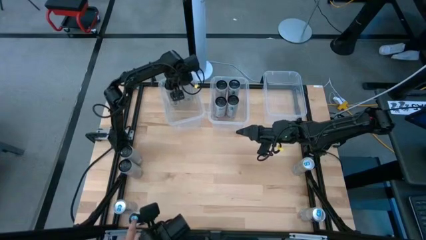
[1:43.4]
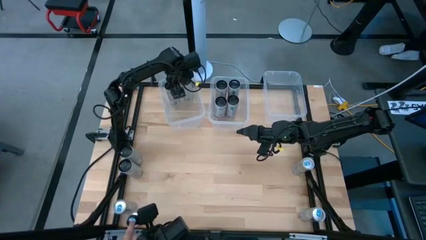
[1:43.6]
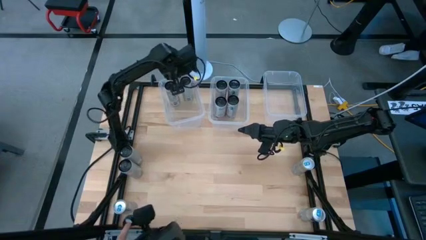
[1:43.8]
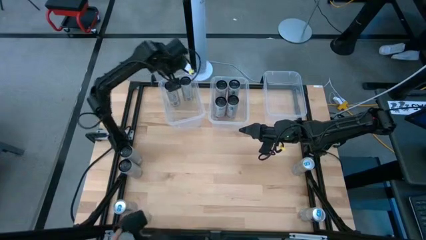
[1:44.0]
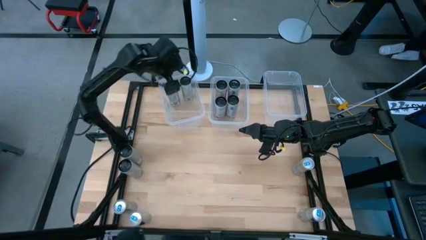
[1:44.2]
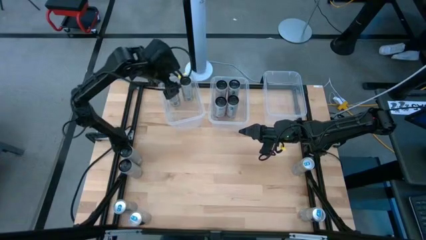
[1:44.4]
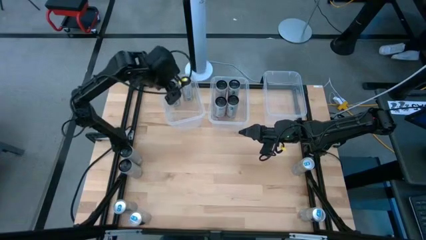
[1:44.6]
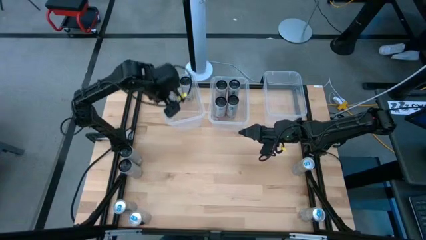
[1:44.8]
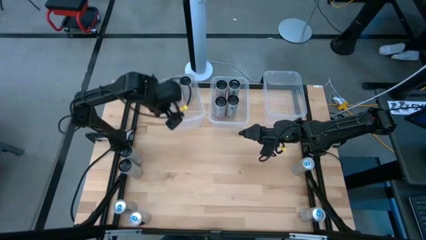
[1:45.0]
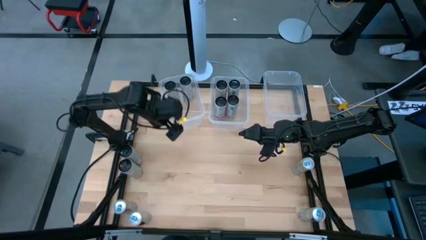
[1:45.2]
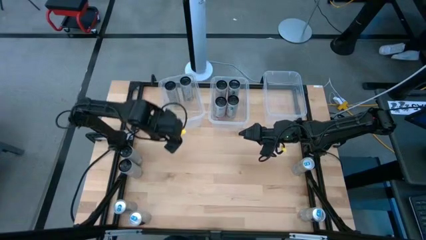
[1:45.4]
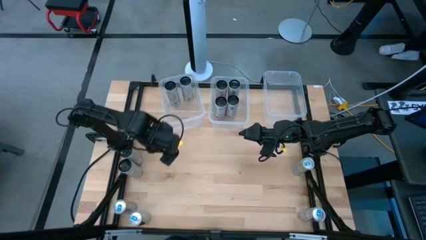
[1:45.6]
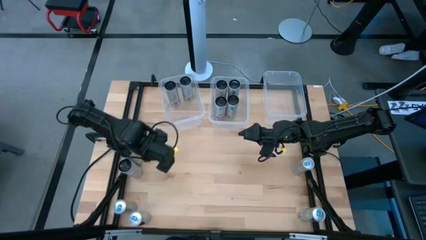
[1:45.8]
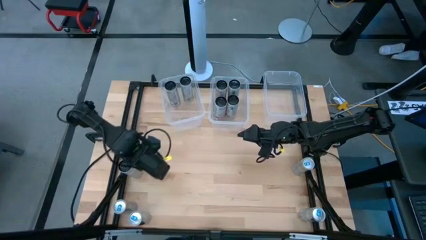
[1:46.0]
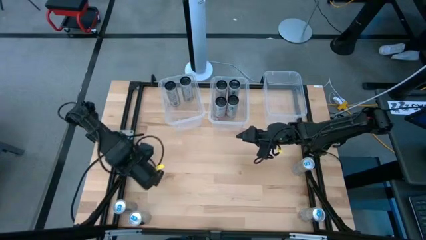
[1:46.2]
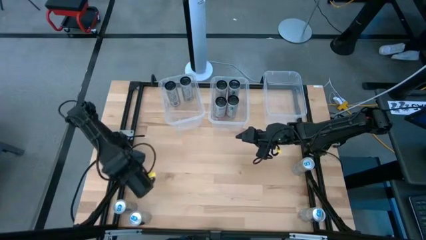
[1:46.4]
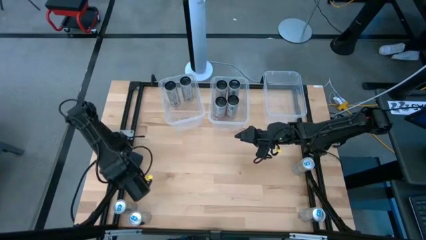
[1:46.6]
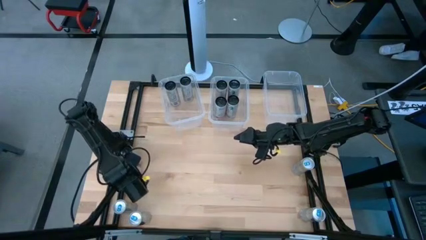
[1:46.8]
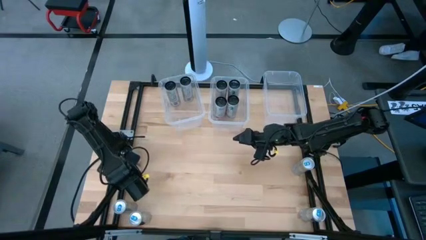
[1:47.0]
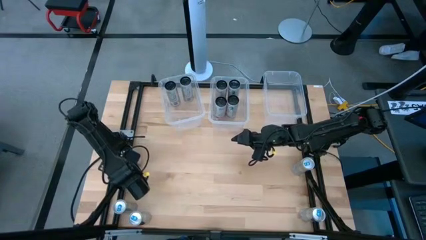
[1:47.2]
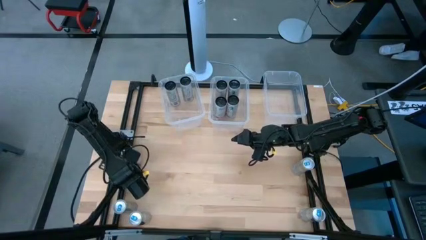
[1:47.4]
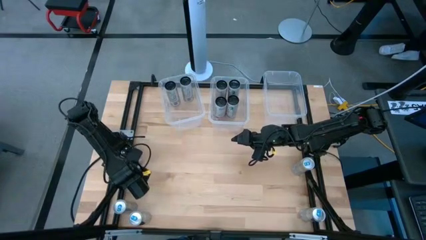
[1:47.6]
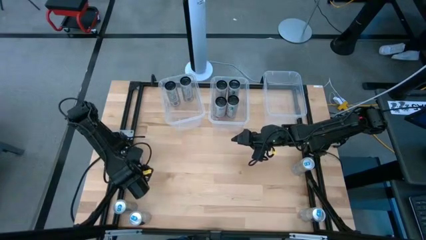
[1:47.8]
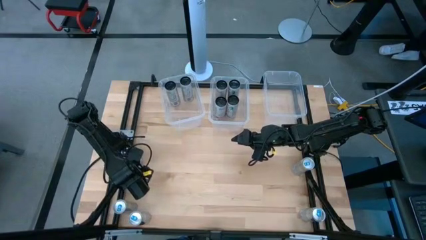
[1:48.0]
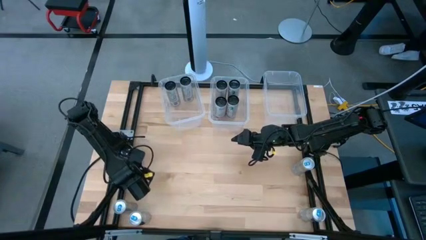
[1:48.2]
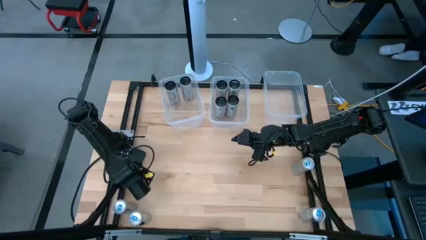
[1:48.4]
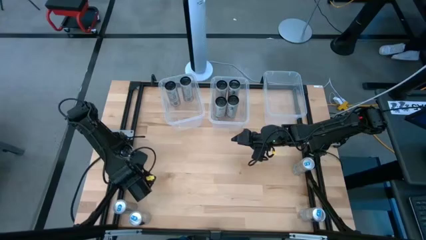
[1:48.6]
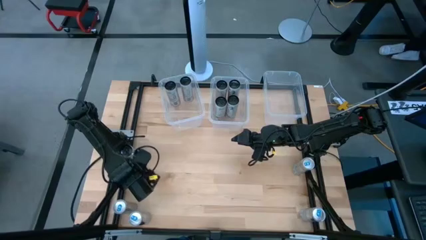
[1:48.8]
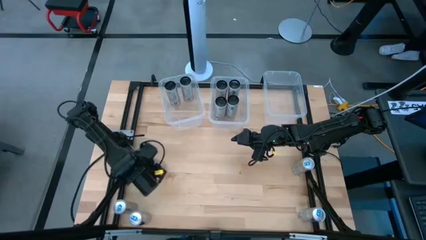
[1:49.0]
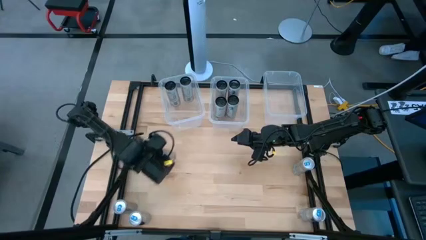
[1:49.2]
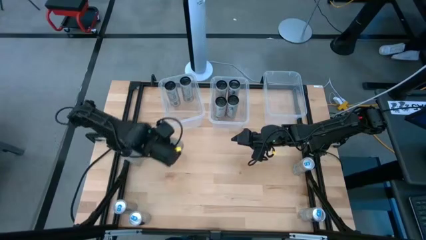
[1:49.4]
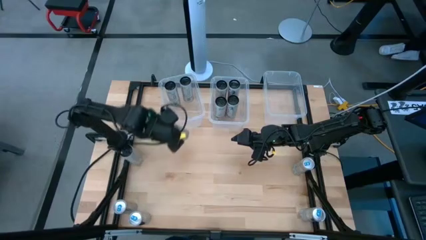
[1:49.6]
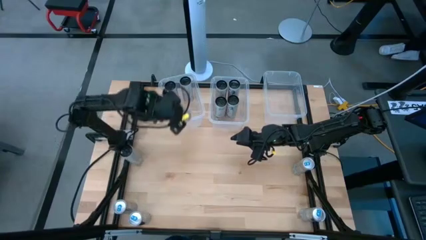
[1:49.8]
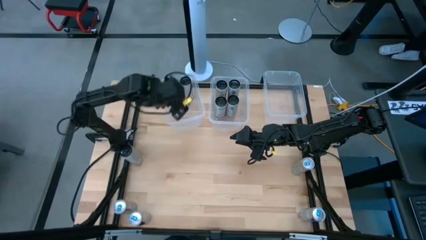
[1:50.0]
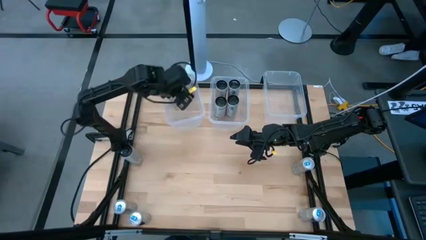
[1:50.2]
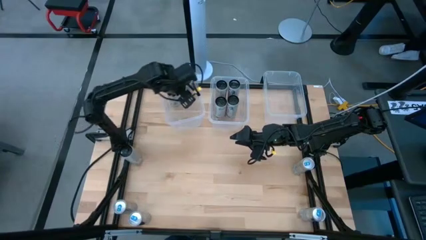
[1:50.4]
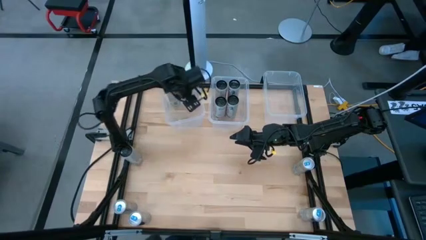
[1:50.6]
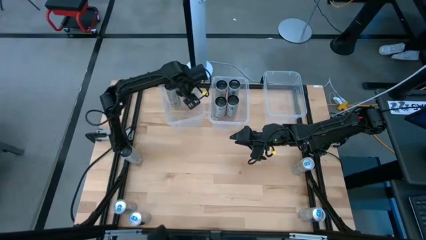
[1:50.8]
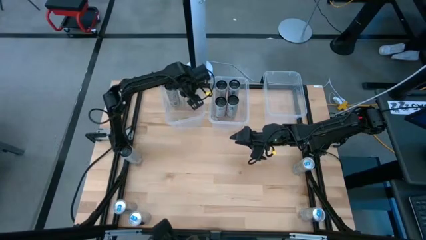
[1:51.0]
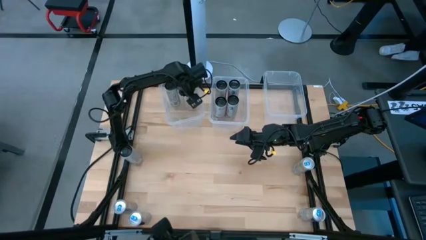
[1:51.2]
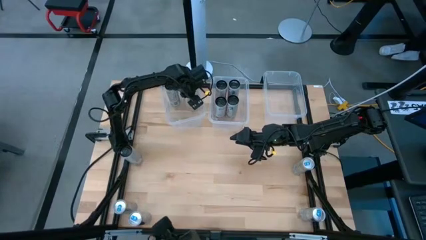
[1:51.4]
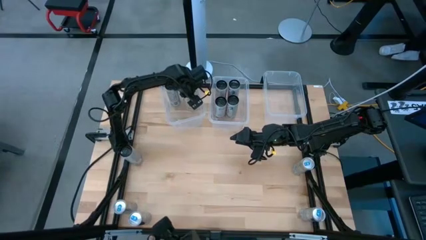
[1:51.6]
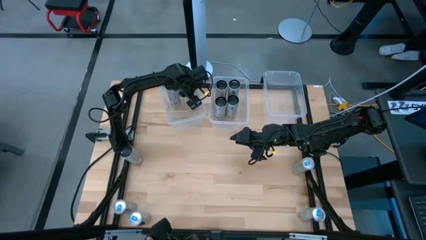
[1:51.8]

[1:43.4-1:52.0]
Task: Sort soda cans
Put the bottom white and black starfruit soda can into the left transparent bin

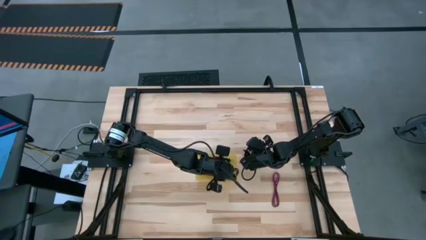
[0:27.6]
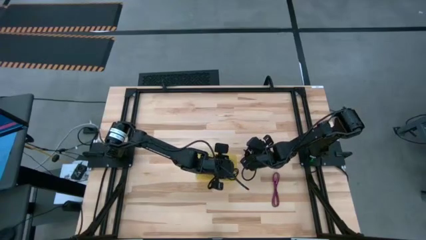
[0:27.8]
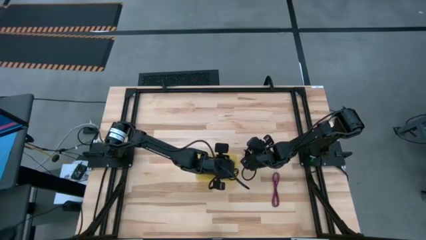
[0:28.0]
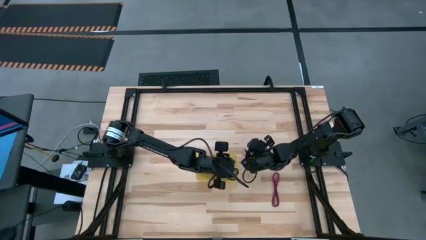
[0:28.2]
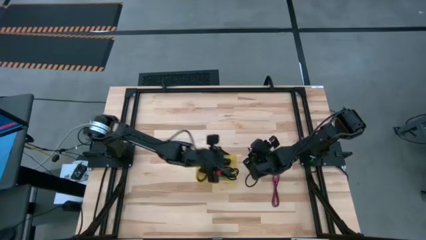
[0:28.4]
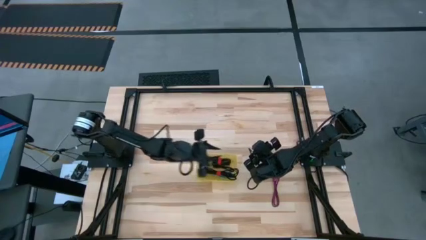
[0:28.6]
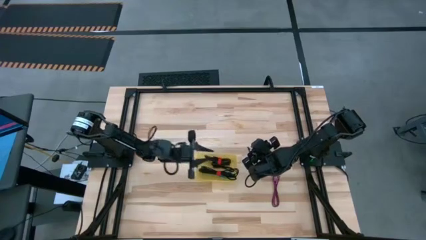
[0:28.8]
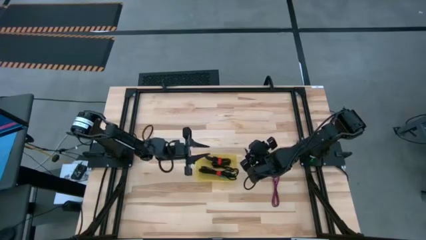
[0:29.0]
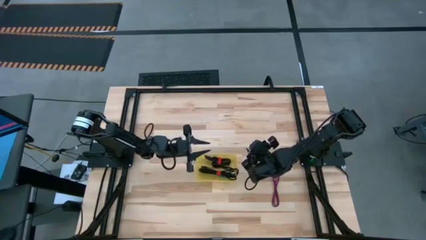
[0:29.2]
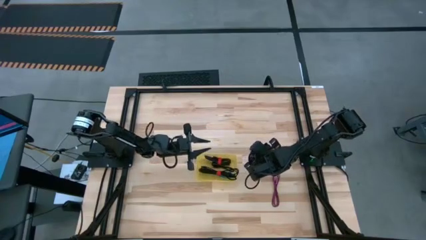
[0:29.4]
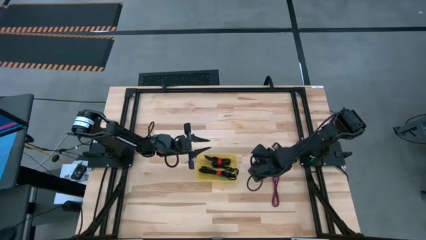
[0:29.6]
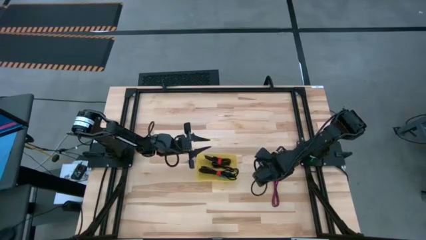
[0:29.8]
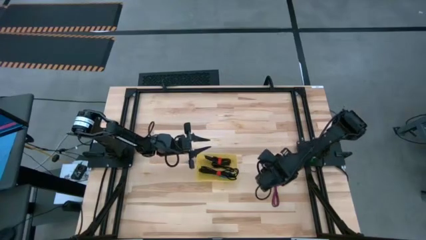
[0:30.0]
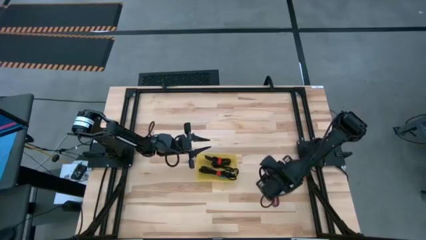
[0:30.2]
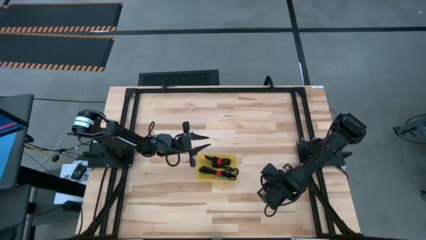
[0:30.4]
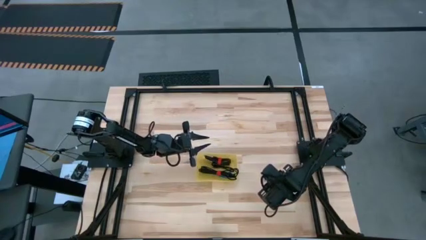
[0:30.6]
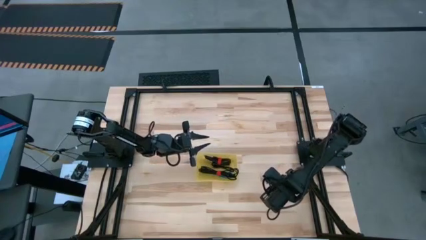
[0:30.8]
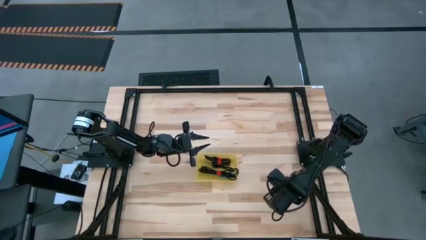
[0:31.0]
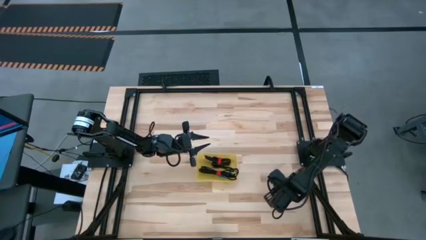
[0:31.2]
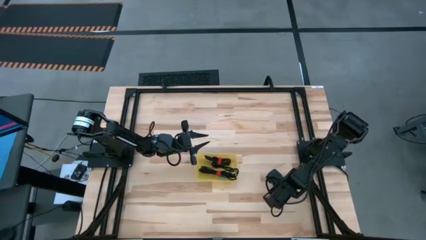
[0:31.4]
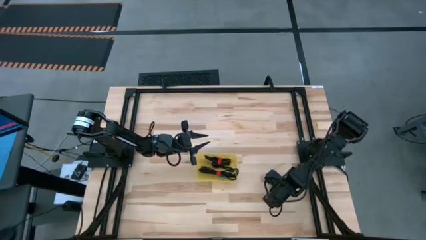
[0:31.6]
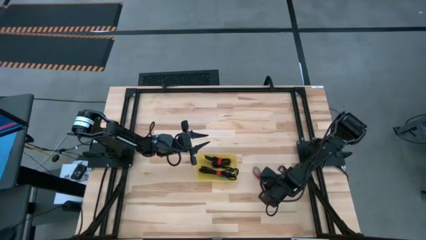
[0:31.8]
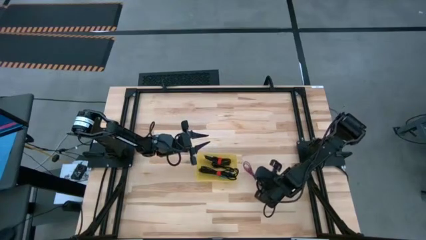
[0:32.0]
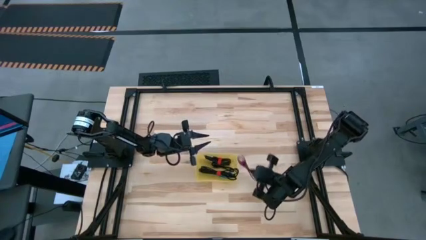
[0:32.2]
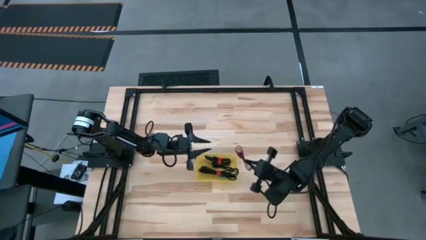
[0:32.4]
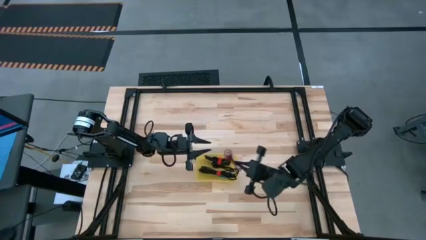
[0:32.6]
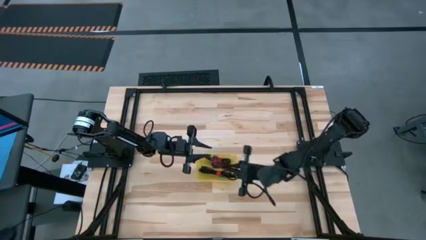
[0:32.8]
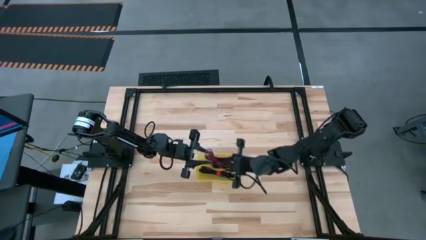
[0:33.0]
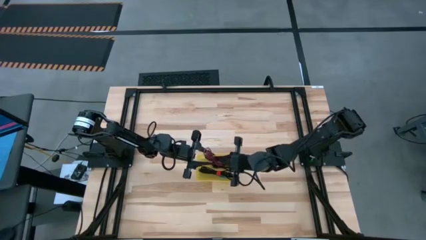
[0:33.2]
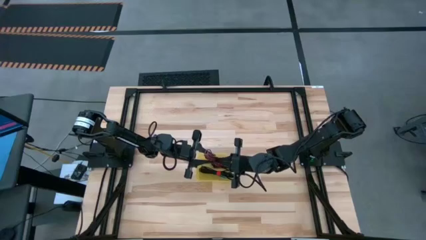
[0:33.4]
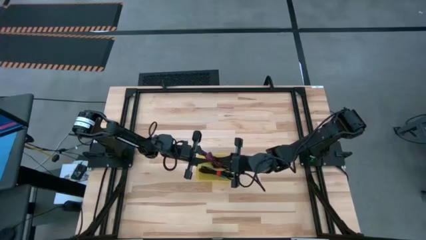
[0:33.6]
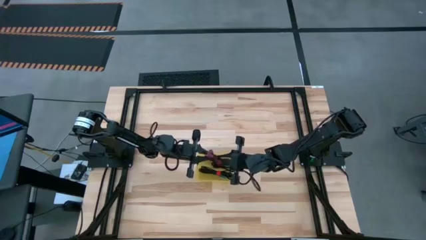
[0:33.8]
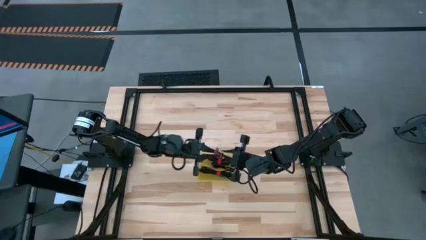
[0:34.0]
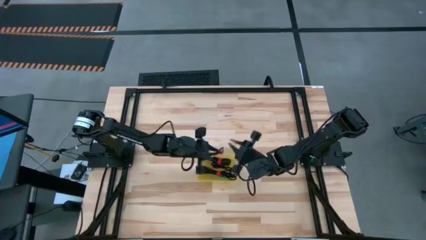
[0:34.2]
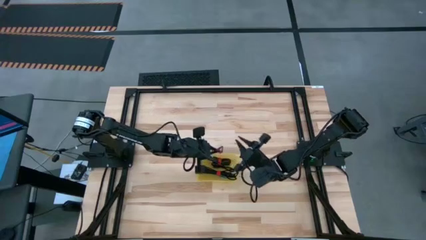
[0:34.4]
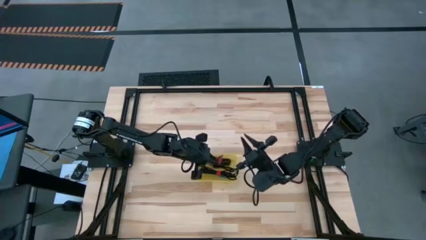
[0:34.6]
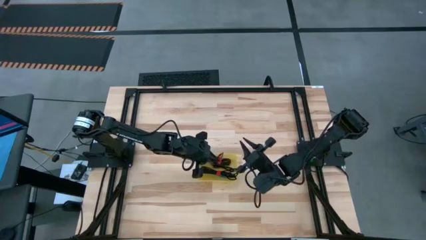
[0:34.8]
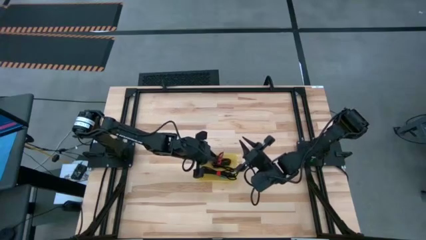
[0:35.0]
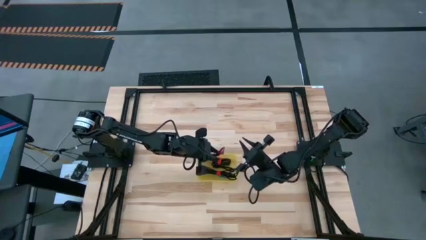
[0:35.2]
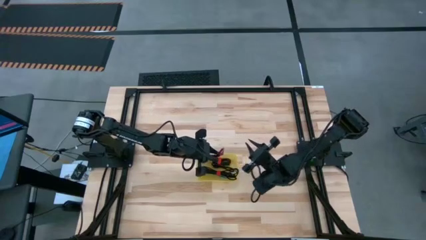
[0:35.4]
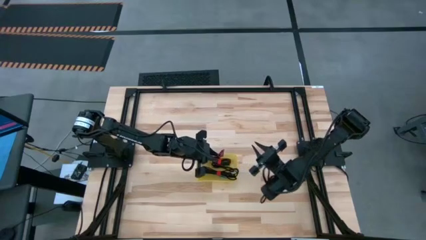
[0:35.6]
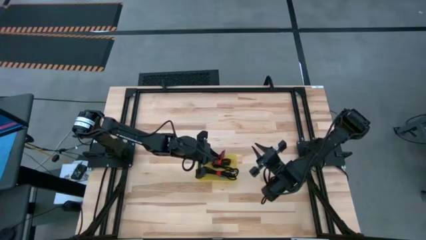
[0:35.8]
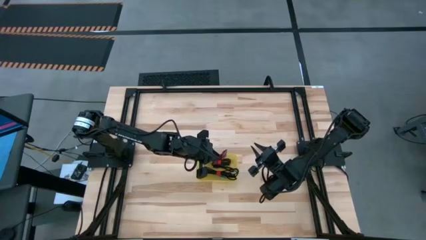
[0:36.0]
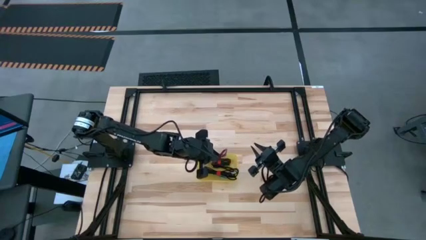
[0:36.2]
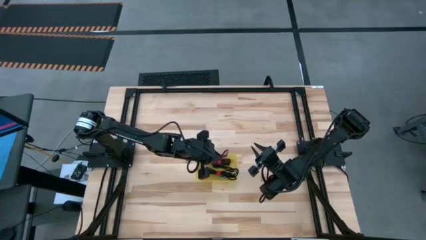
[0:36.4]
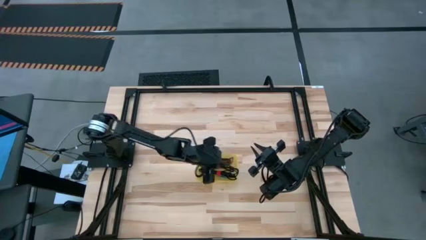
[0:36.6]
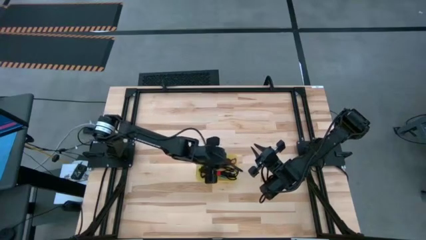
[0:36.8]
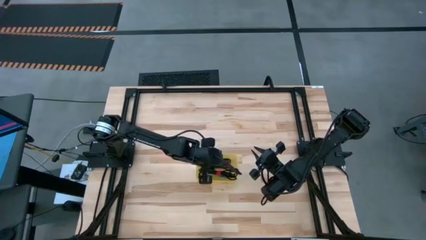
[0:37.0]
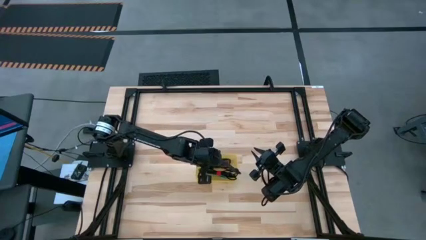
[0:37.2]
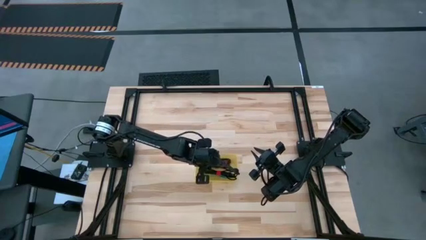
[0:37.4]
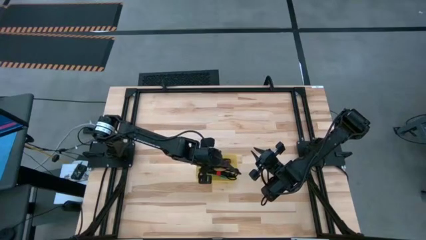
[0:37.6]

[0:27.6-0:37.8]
Task: Pick and place USB-C Cables
Put the red charger cable into the yellow bin
